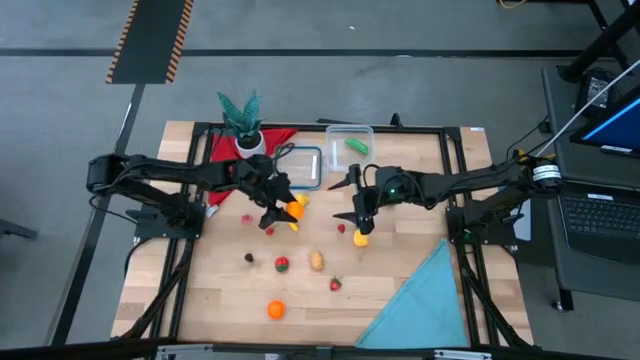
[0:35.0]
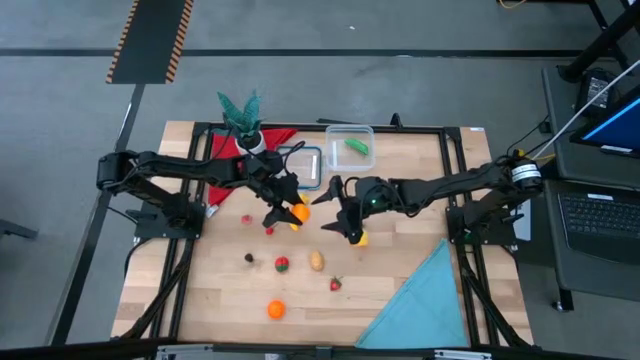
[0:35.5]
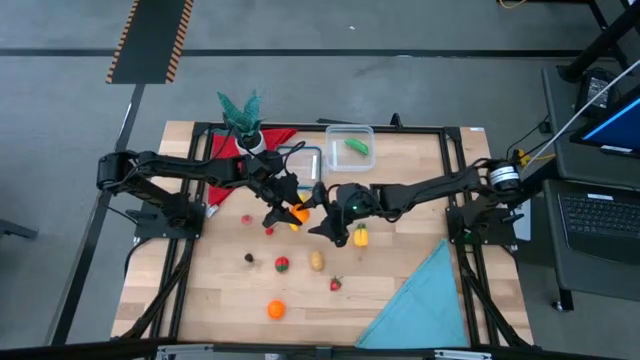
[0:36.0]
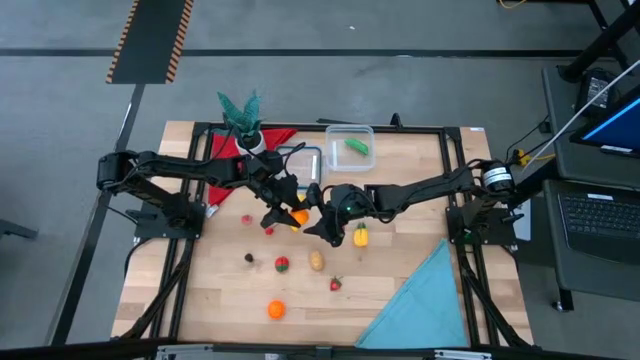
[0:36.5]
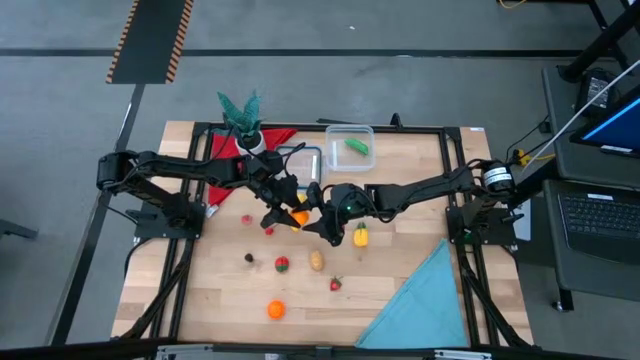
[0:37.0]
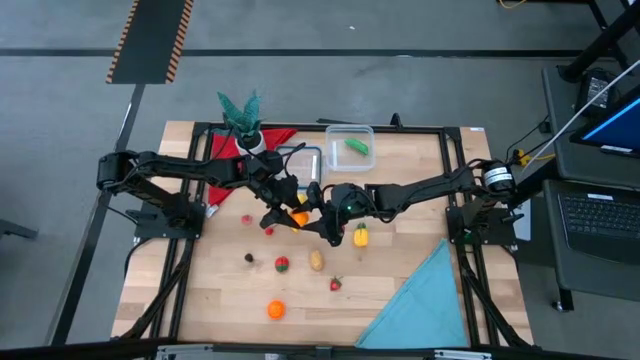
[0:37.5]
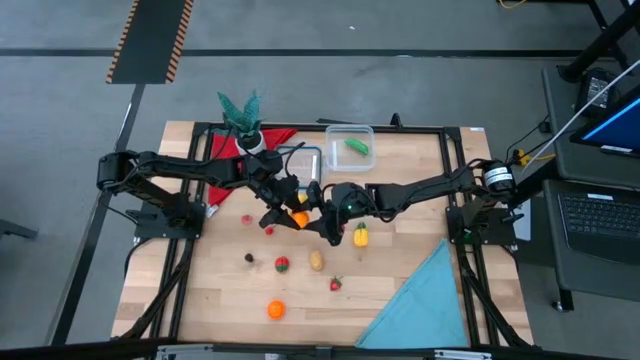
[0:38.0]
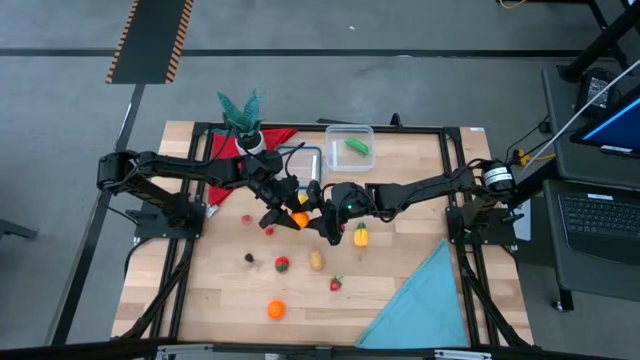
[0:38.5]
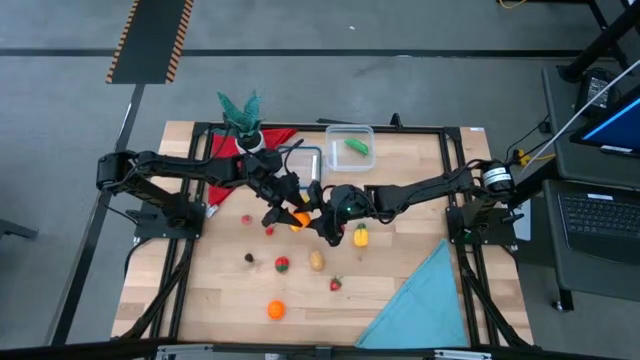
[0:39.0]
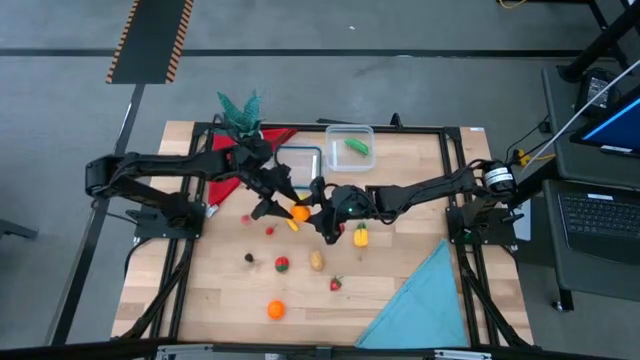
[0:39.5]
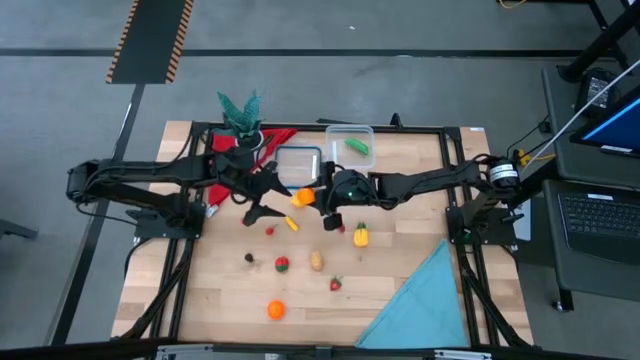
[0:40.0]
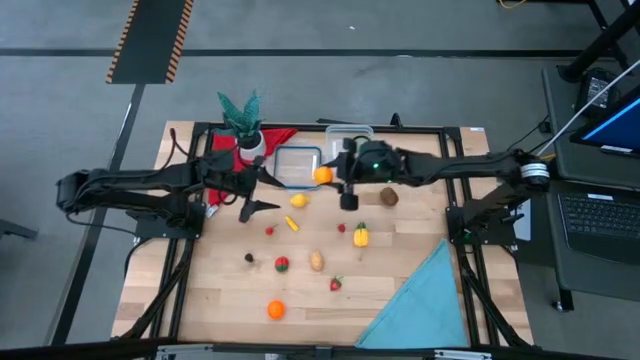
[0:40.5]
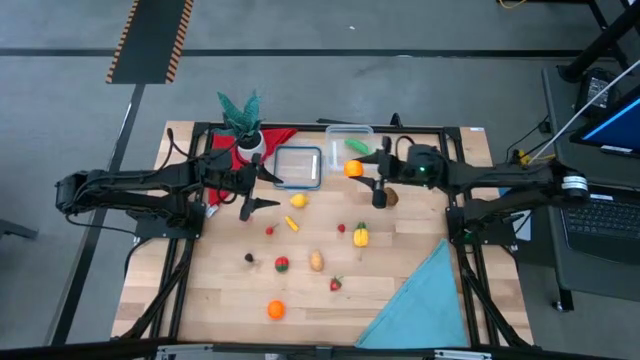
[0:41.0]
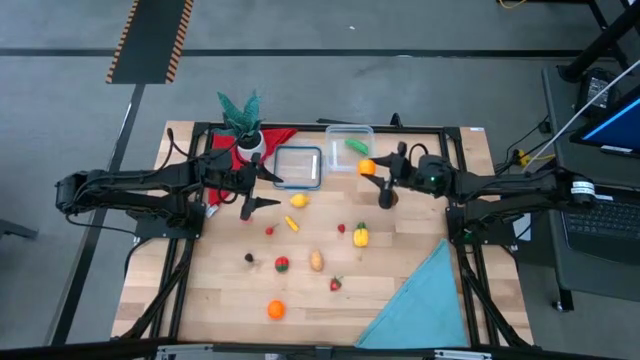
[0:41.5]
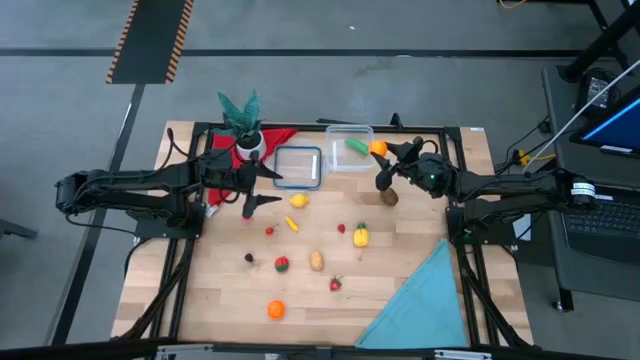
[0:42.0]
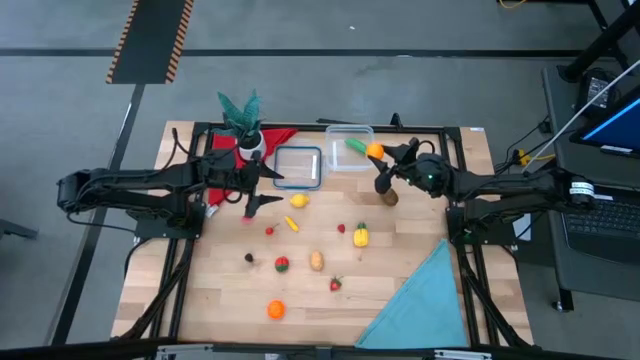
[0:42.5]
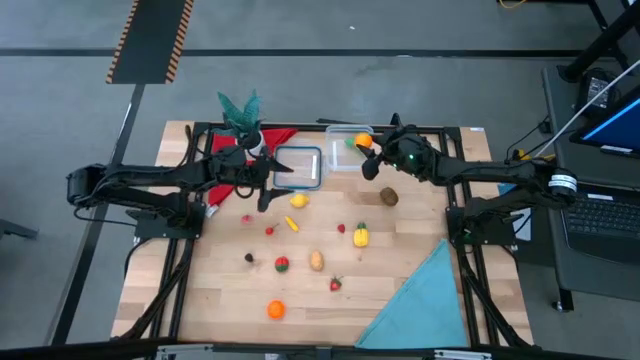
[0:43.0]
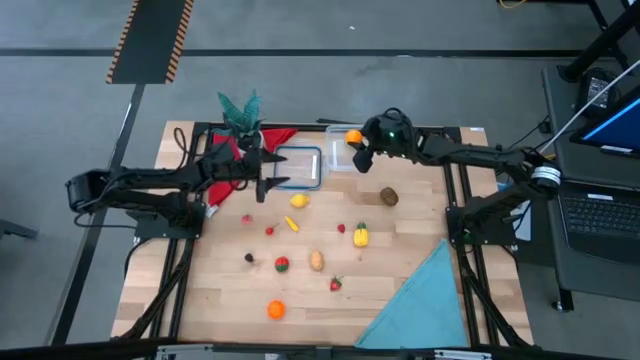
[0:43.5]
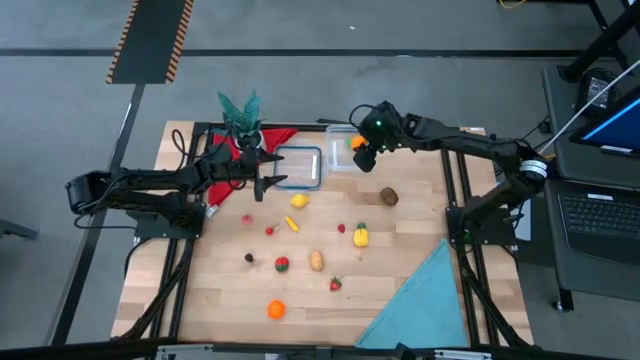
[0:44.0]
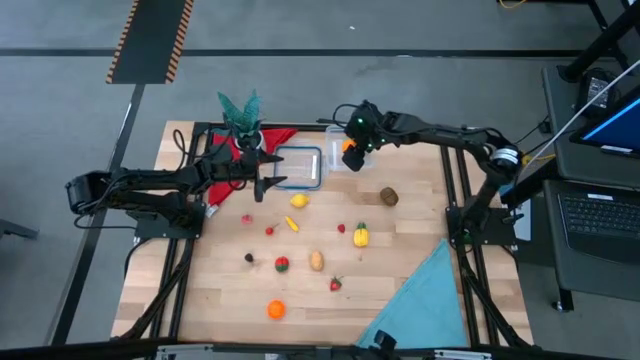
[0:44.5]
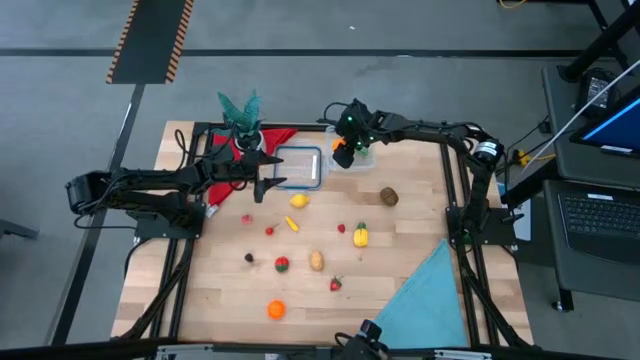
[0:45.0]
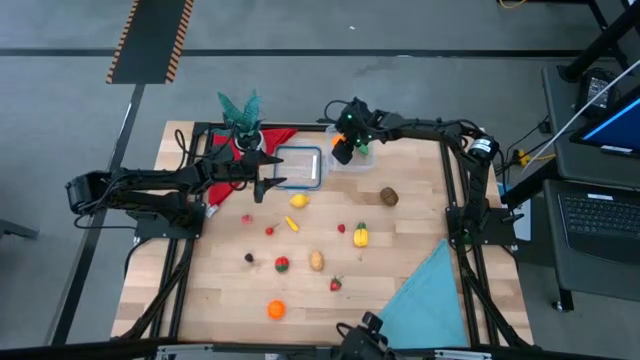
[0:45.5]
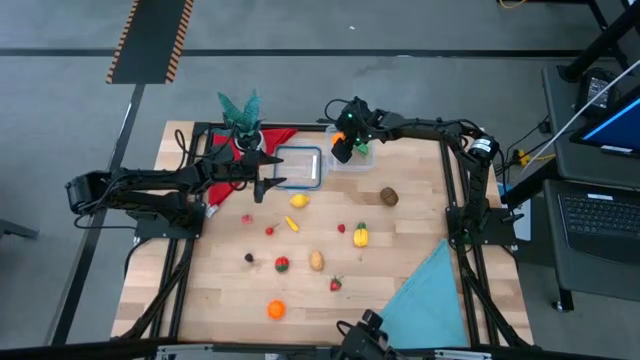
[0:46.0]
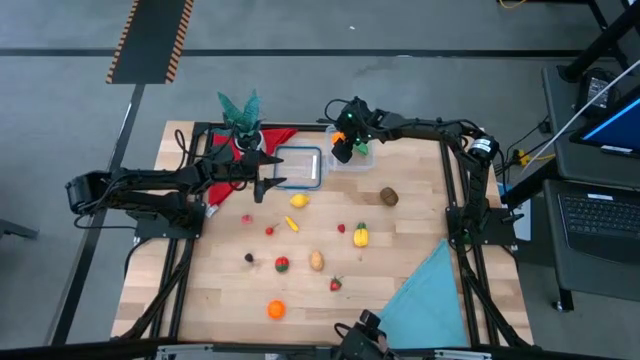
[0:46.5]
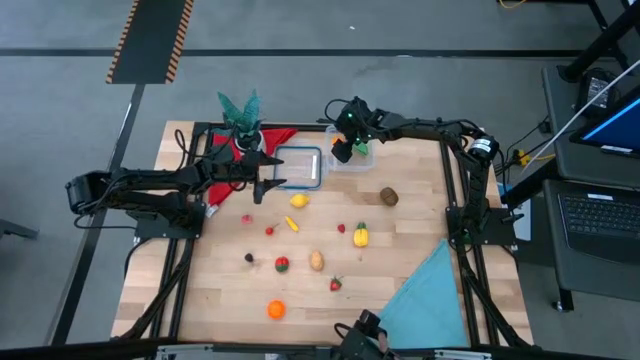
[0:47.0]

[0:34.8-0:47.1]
Task: Pick and placing Produce into tupperware
Put the orange into the transparent bin

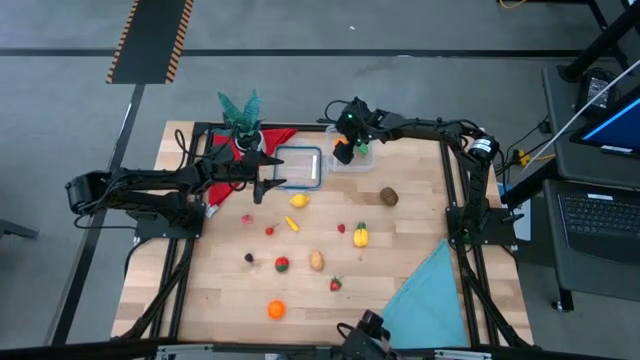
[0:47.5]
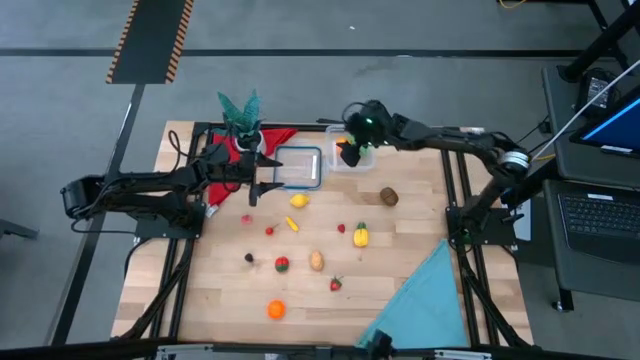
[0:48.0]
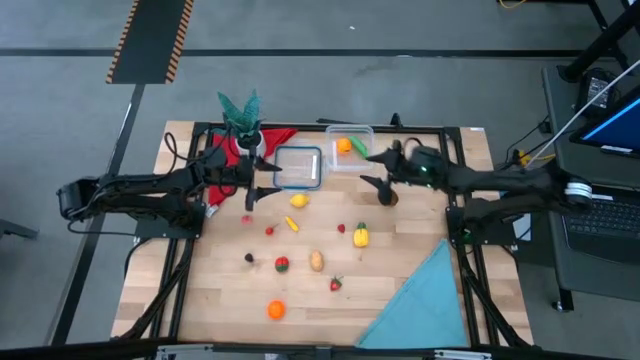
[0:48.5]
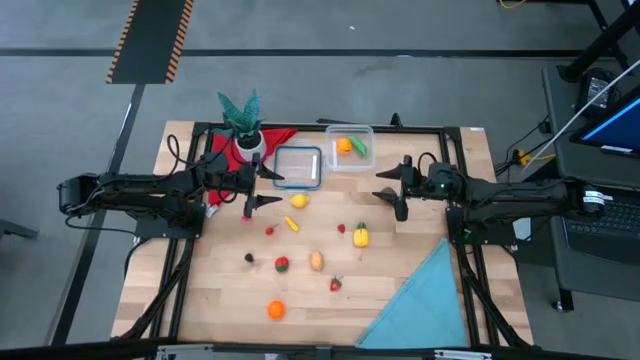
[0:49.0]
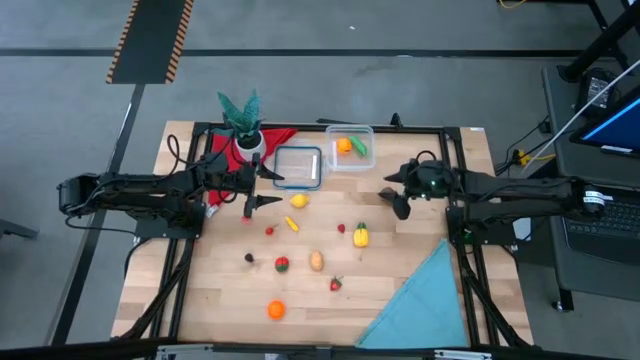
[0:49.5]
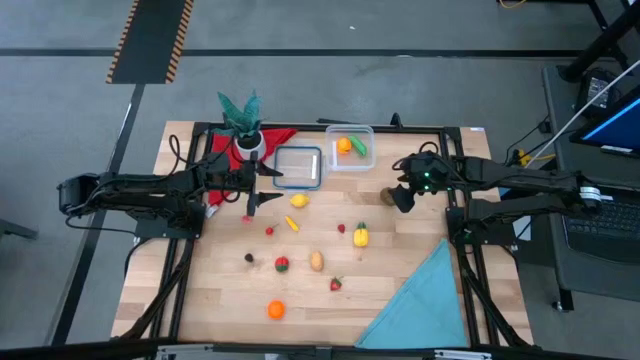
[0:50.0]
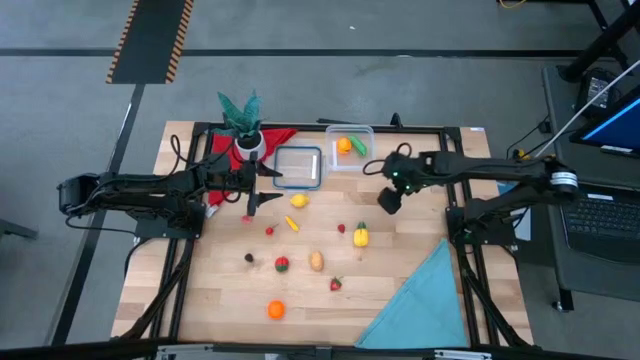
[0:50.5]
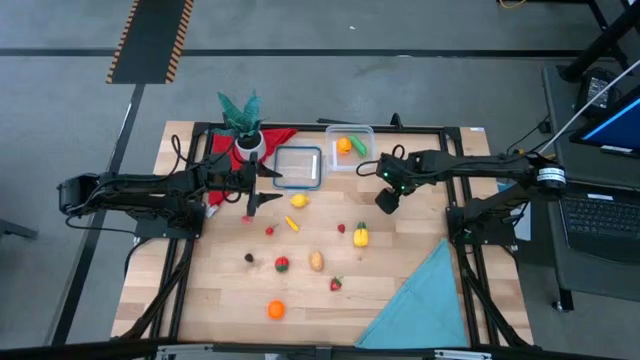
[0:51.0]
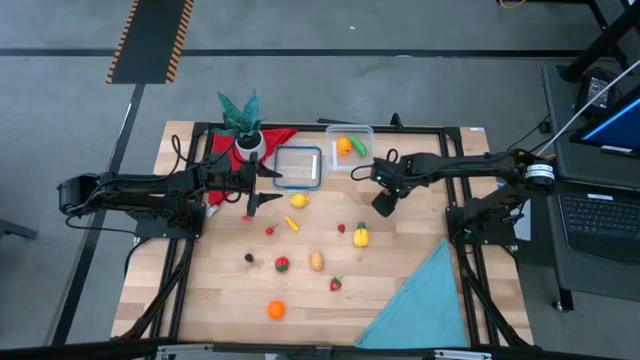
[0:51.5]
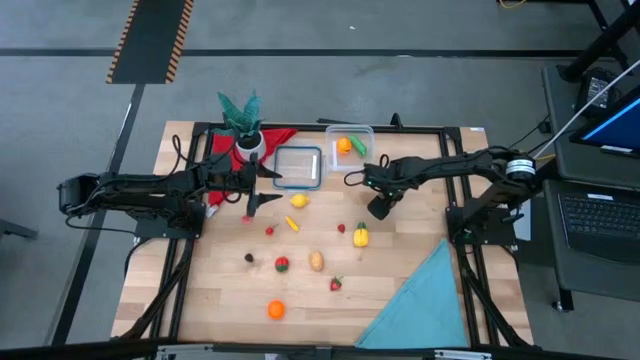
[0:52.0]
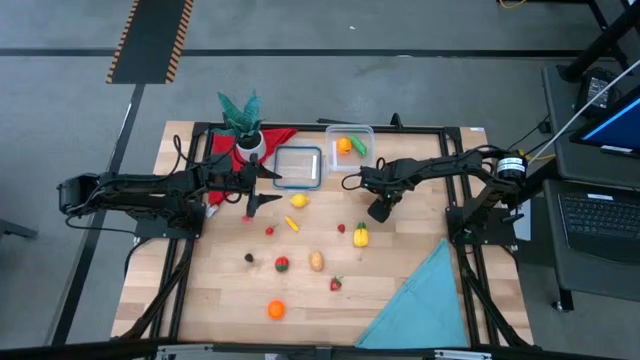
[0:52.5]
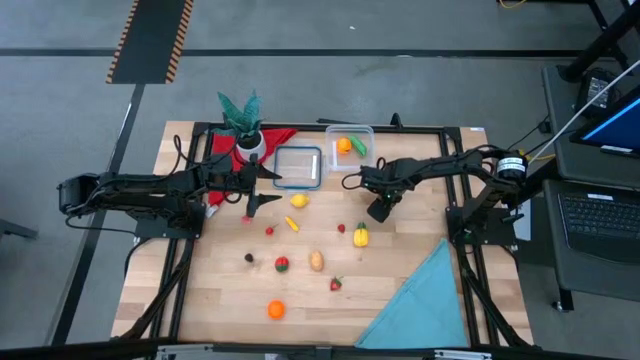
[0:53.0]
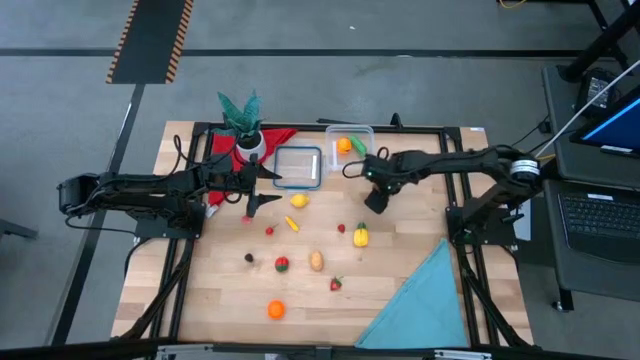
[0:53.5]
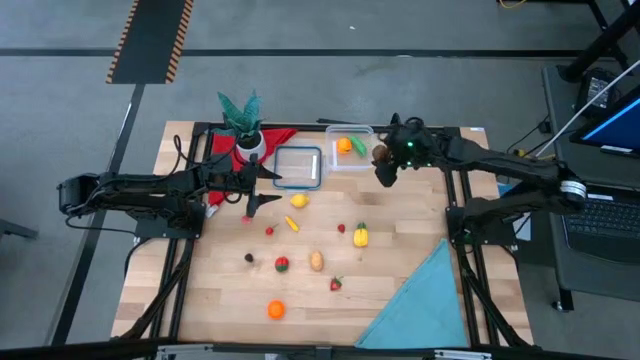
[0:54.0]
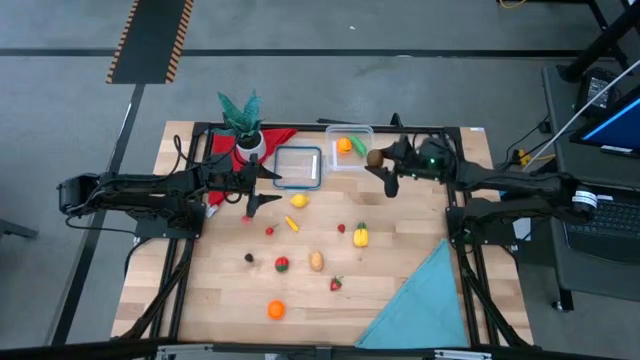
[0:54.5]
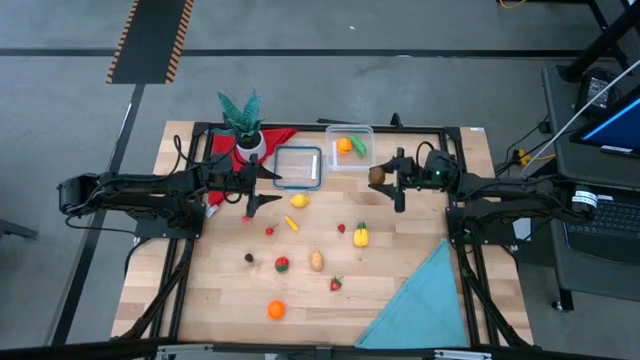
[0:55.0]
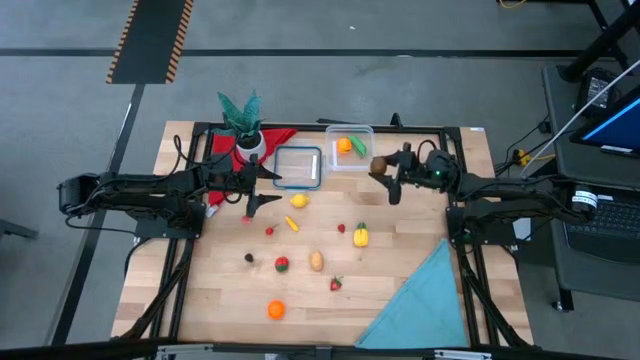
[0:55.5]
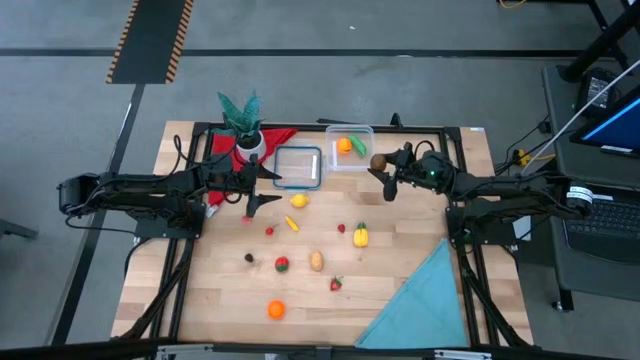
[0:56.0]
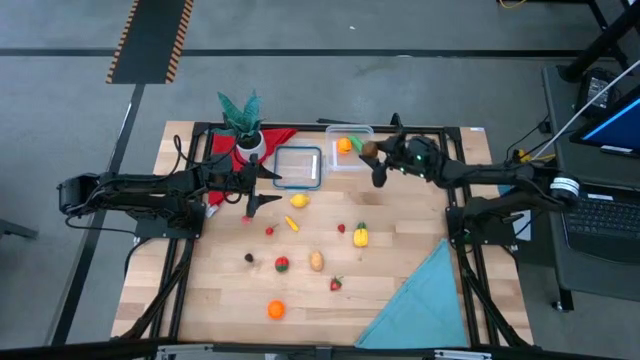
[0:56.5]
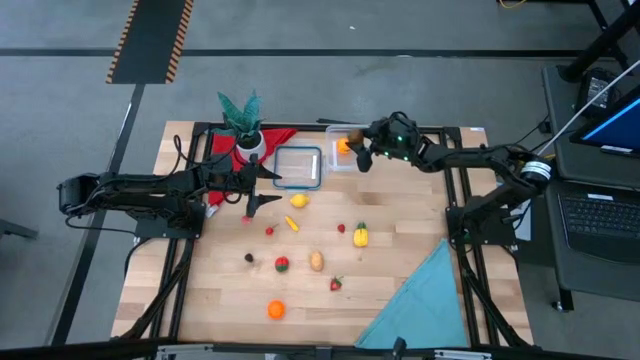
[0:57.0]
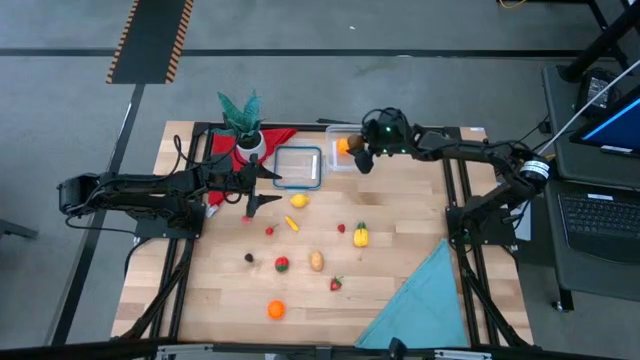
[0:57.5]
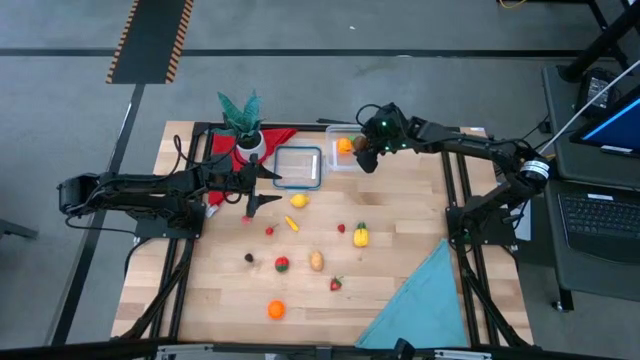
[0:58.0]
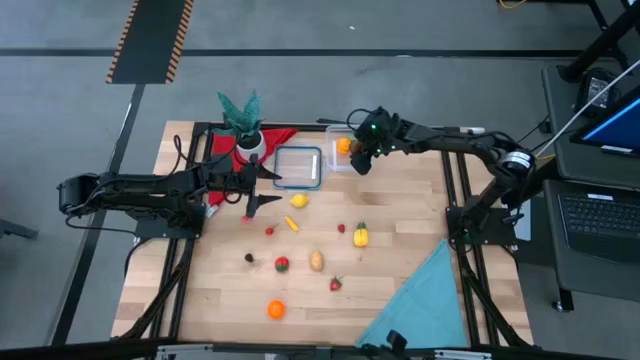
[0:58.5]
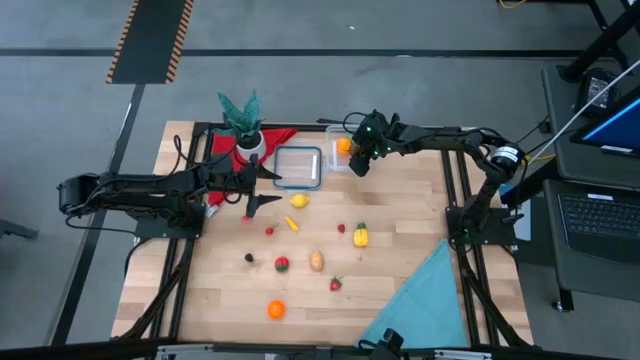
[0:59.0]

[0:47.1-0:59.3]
Put the kiwi into the transparent bin
